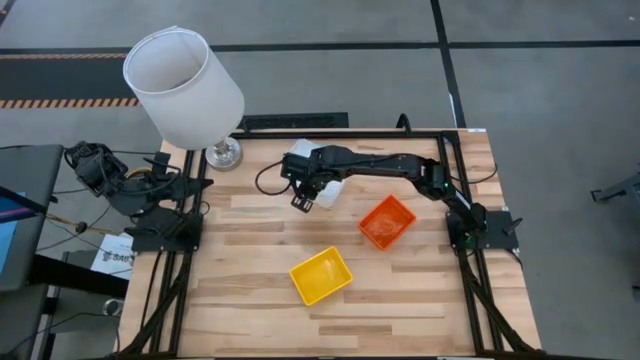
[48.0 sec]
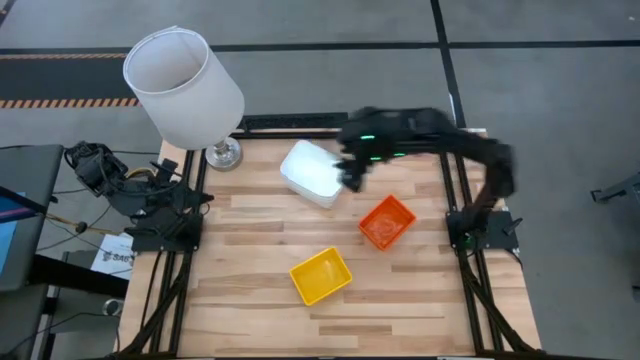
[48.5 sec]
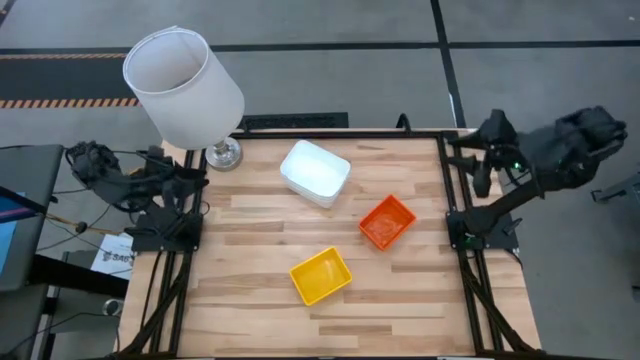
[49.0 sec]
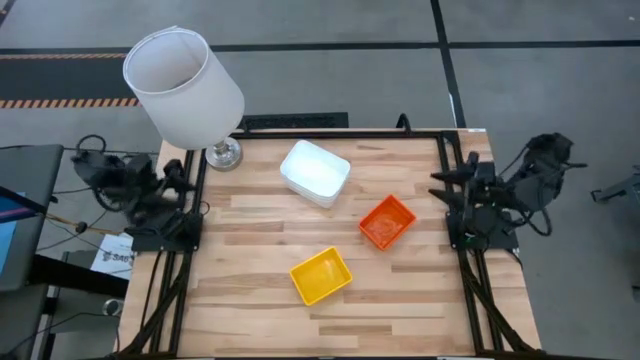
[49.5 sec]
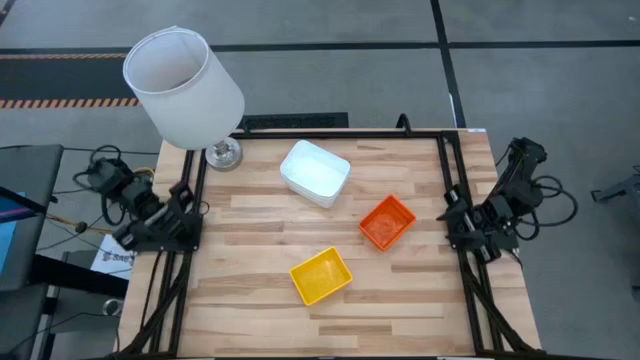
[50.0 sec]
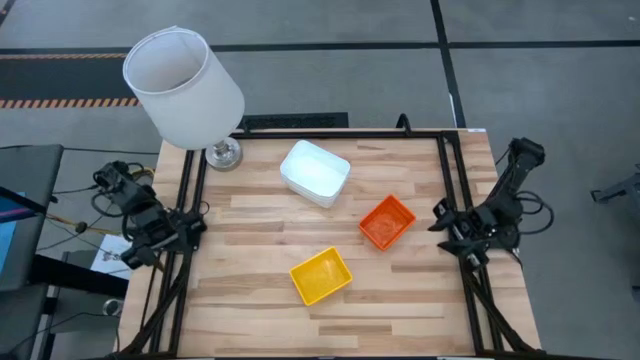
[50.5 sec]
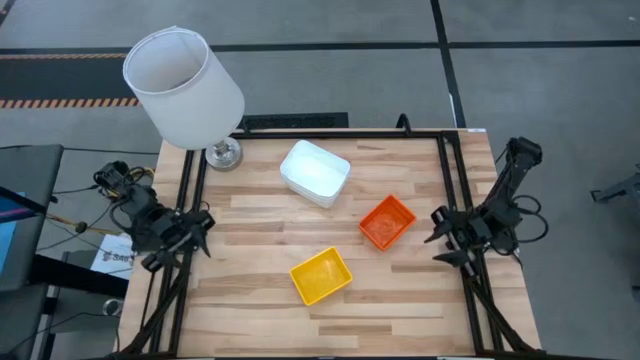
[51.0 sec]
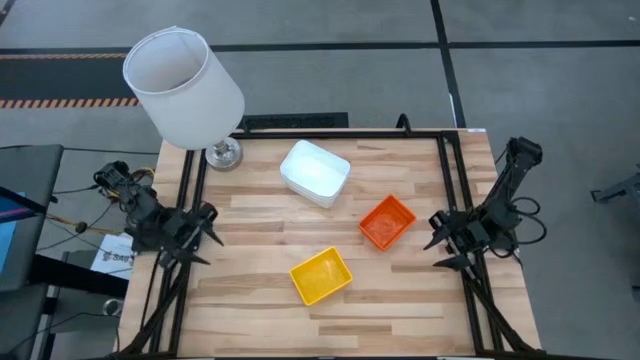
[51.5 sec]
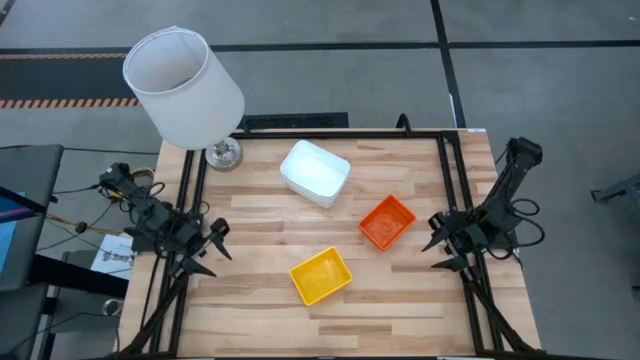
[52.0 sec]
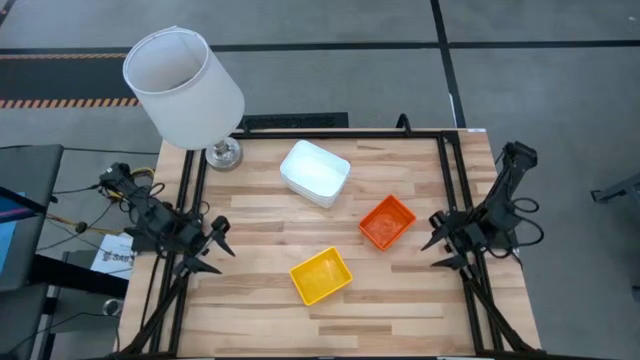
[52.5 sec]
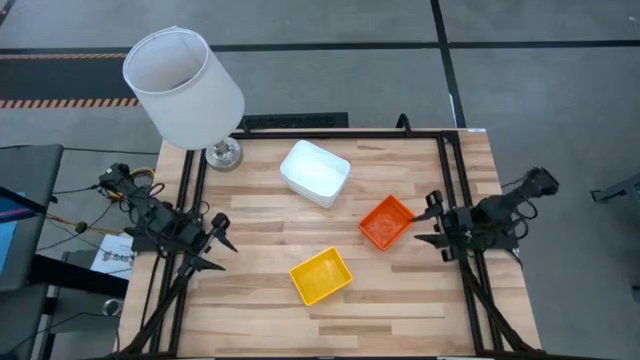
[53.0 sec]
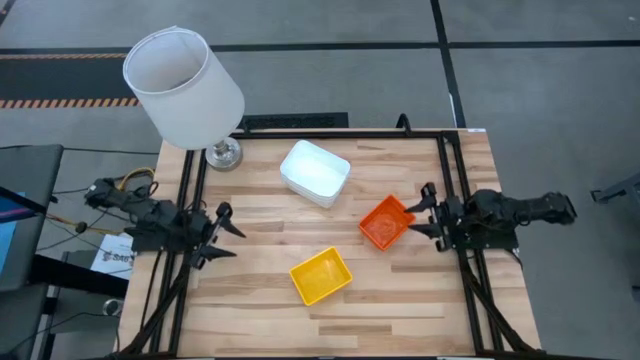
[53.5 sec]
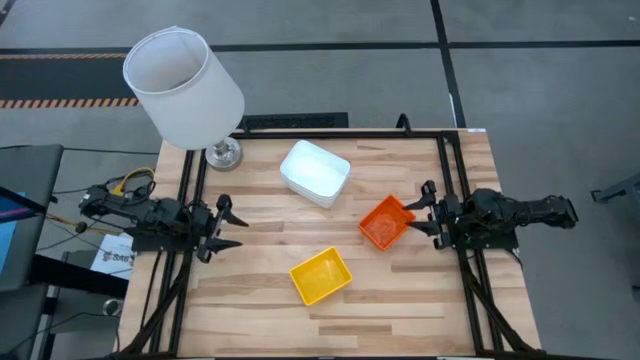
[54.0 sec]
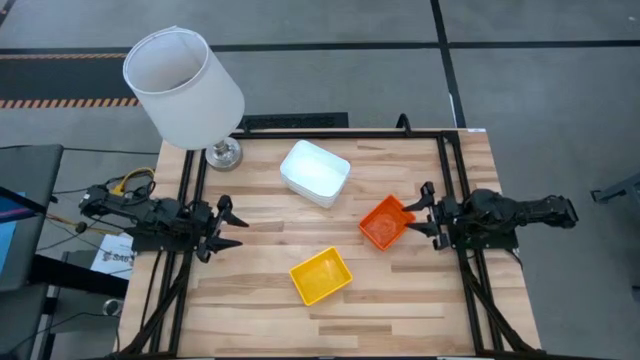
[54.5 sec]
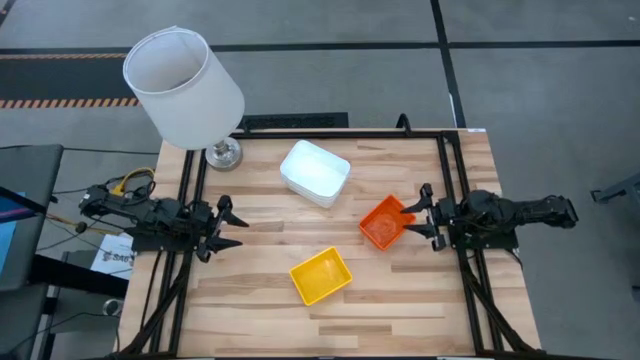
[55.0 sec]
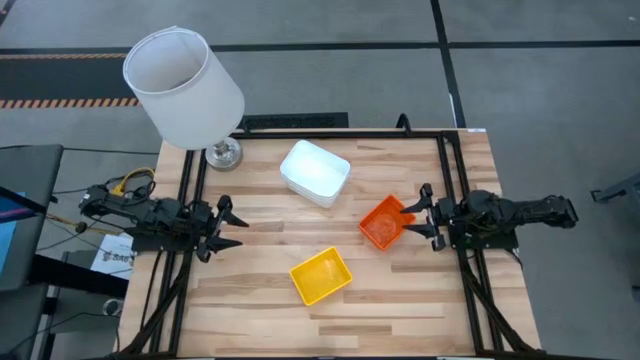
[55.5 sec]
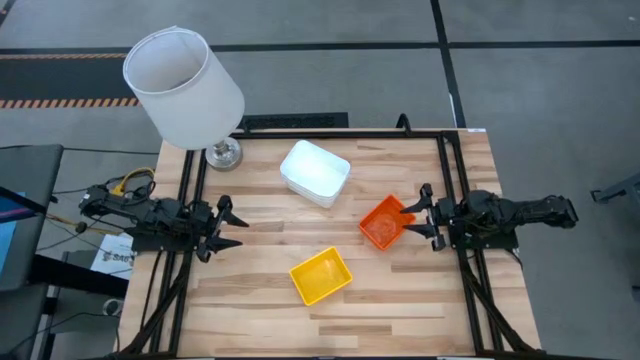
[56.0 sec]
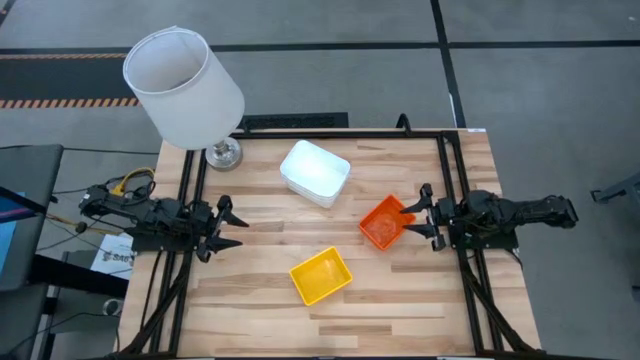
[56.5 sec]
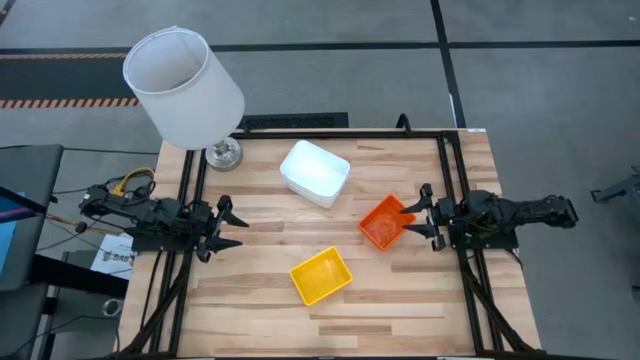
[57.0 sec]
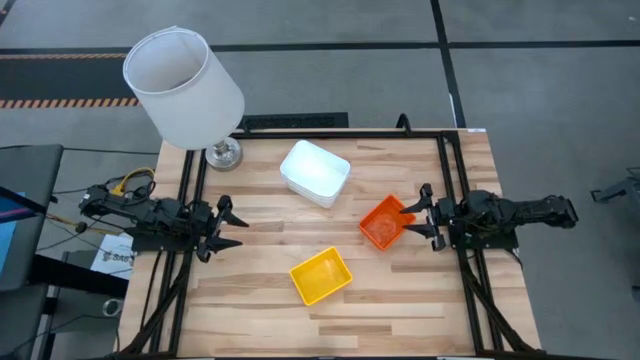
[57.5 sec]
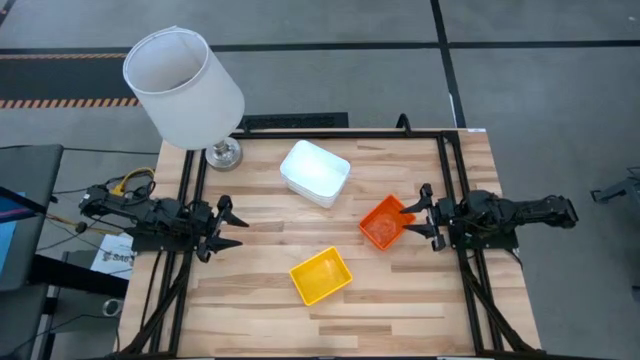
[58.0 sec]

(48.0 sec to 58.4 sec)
Return to Home Position

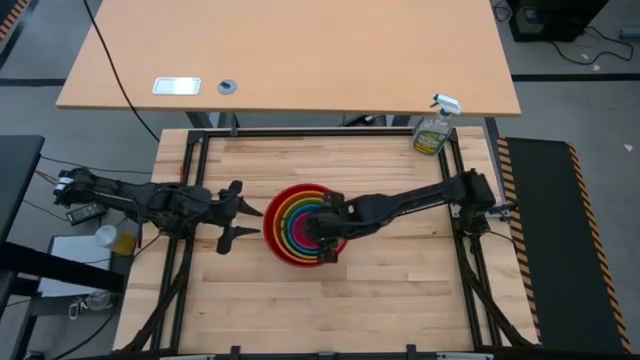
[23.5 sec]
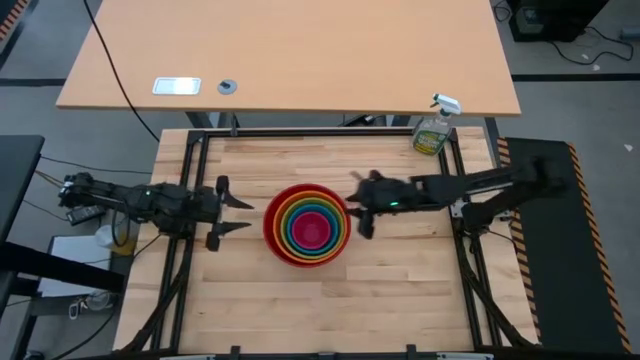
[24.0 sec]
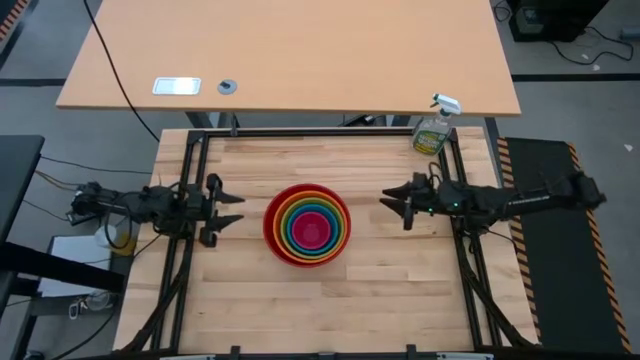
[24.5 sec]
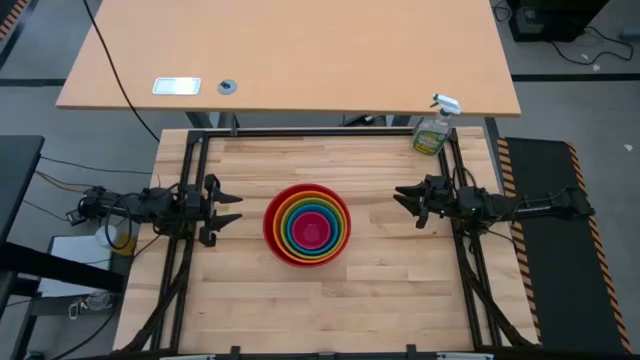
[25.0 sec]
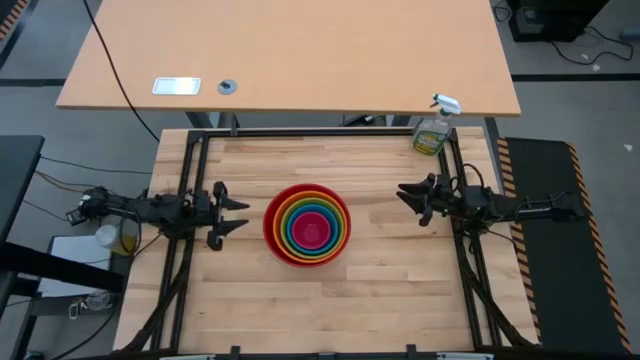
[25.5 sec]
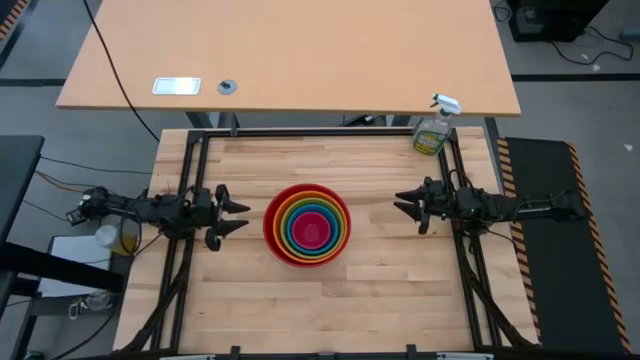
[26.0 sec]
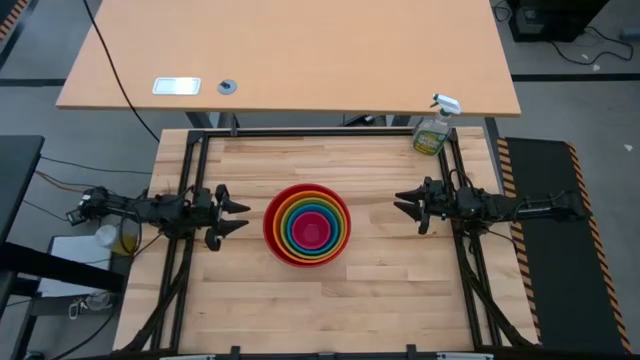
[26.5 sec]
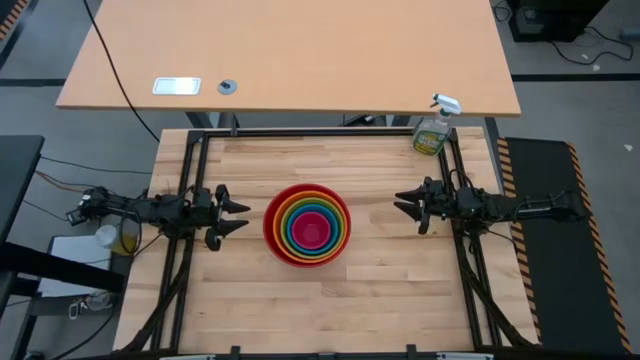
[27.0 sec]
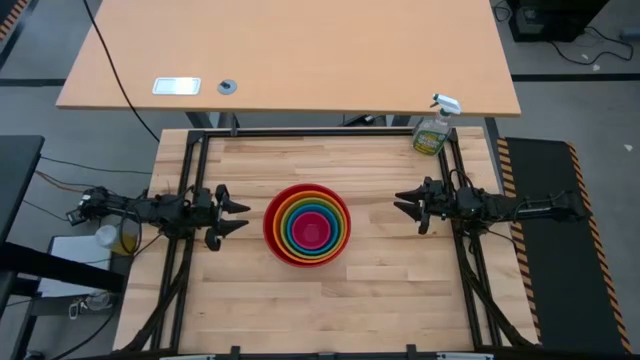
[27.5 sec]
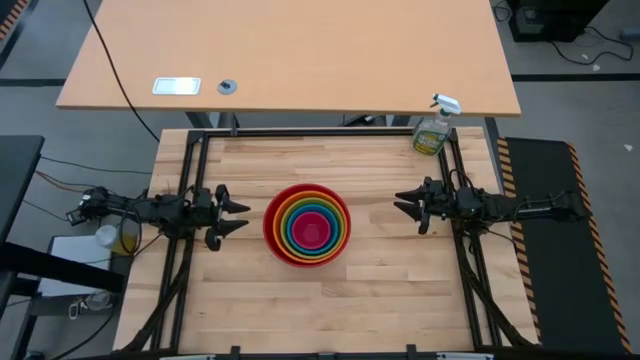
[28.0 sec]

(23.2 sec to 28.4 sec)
Return to Home Position
